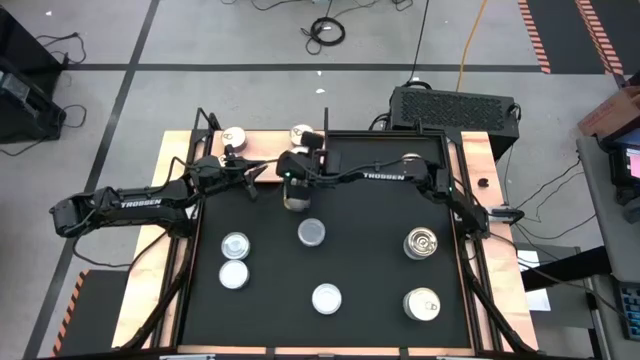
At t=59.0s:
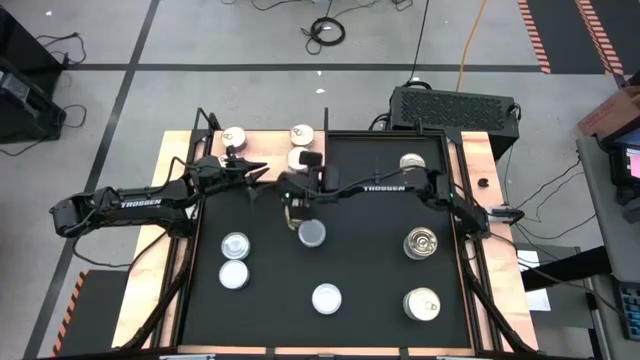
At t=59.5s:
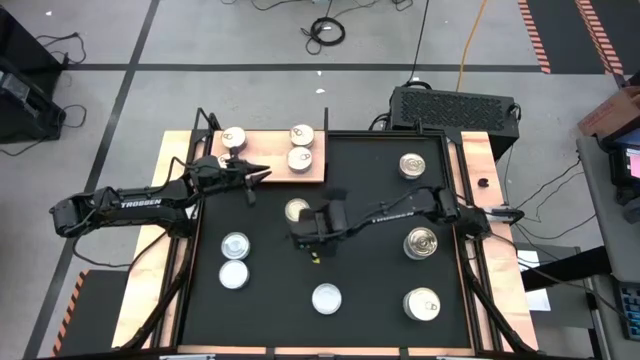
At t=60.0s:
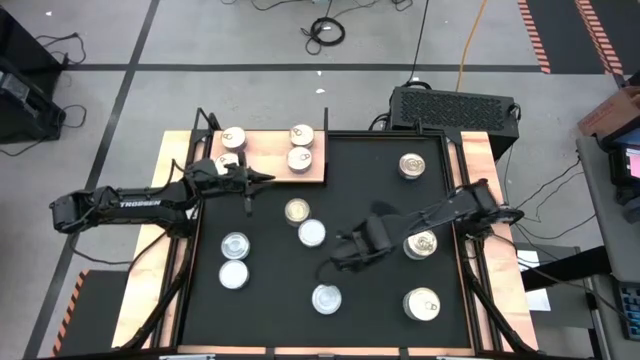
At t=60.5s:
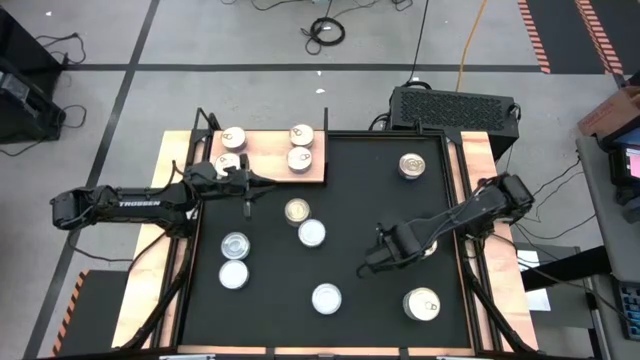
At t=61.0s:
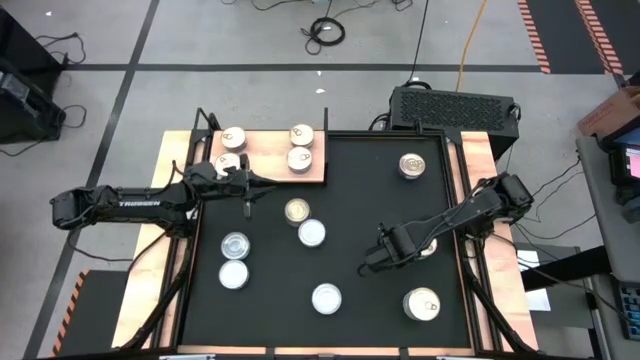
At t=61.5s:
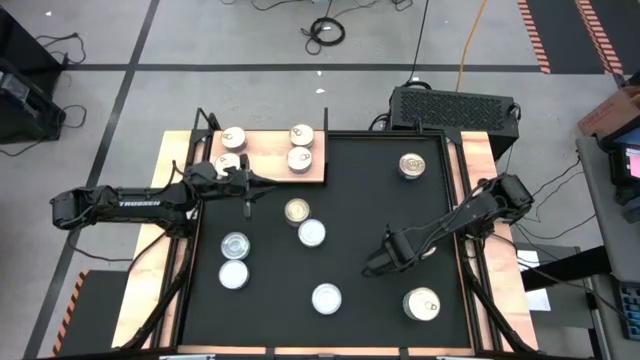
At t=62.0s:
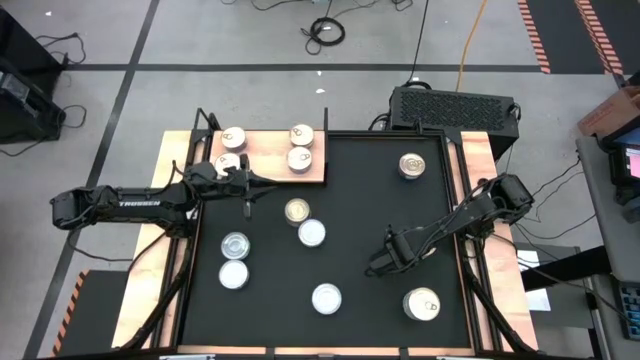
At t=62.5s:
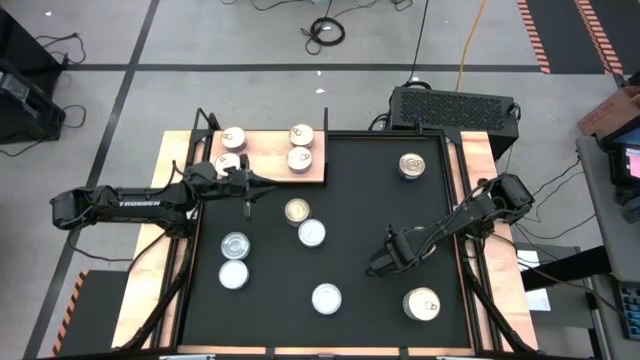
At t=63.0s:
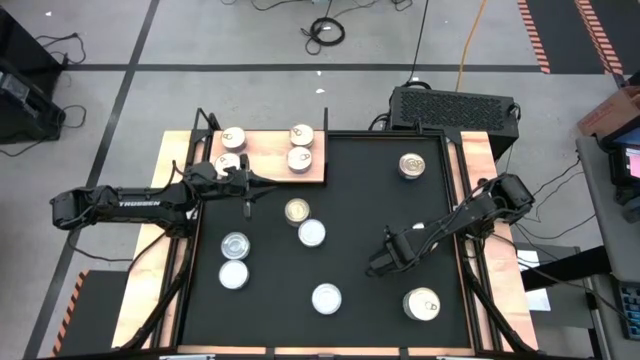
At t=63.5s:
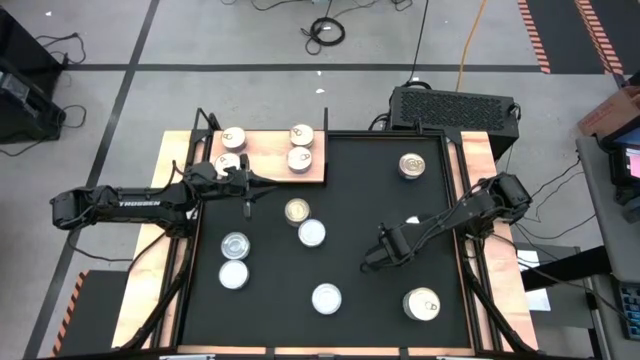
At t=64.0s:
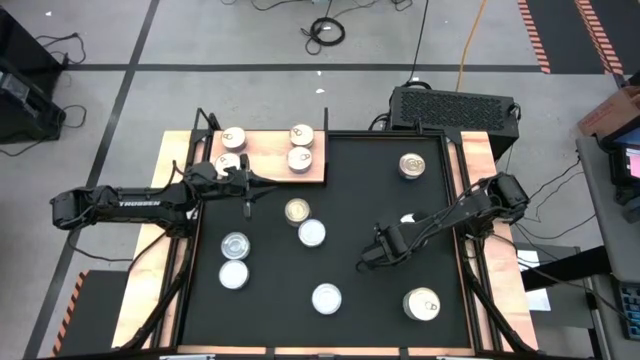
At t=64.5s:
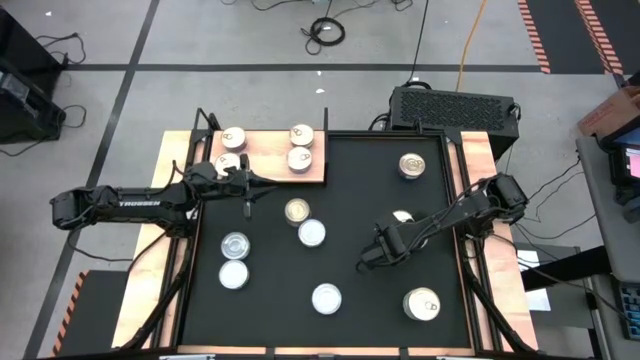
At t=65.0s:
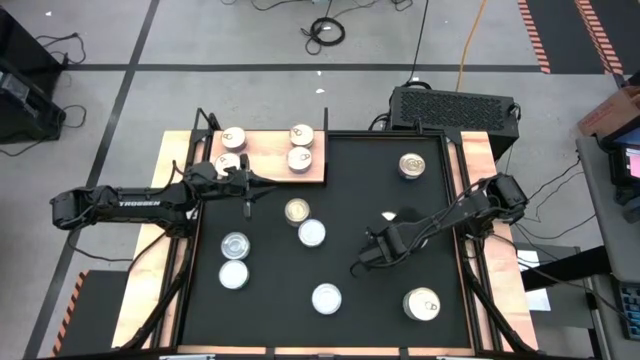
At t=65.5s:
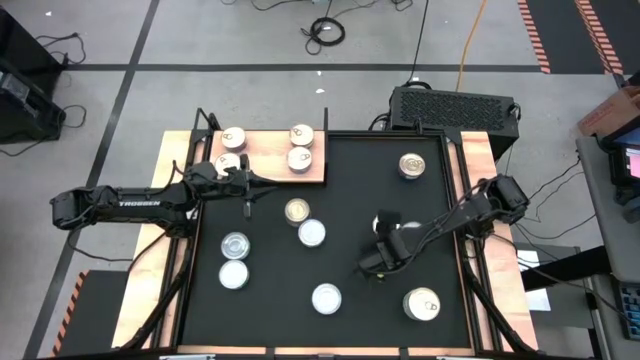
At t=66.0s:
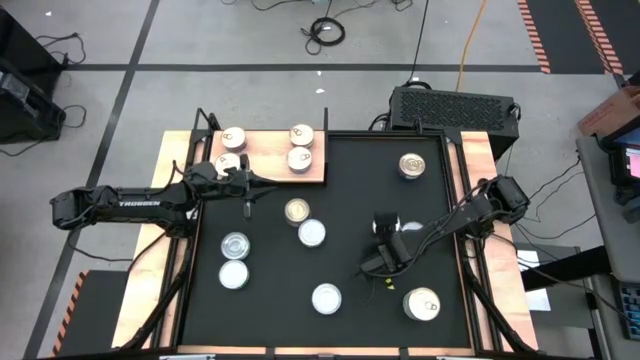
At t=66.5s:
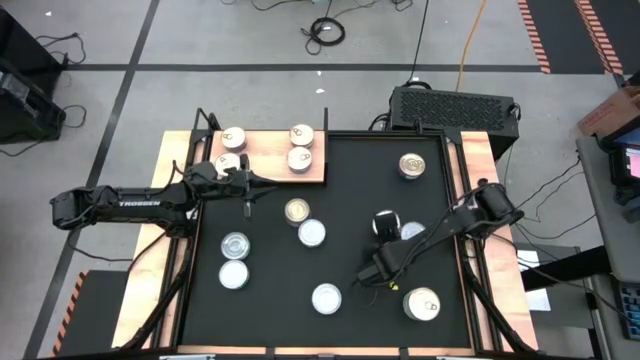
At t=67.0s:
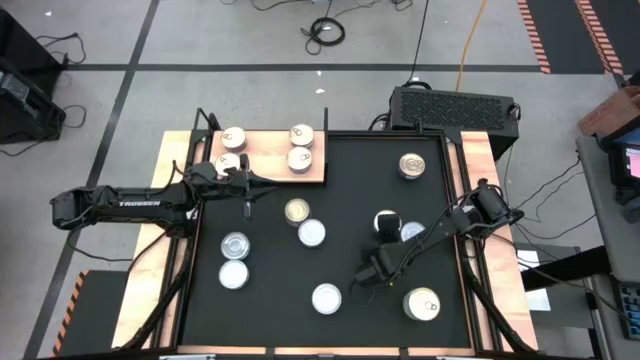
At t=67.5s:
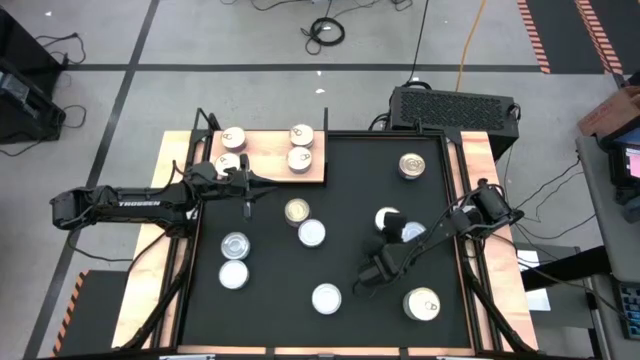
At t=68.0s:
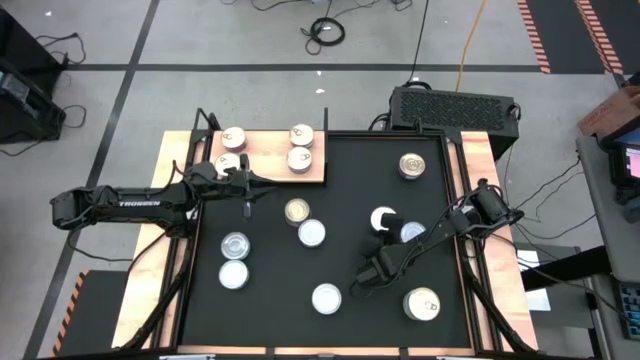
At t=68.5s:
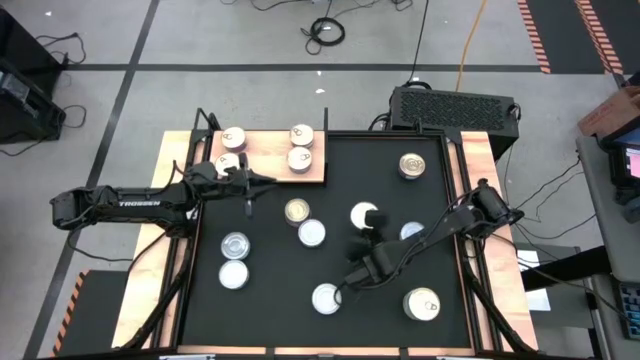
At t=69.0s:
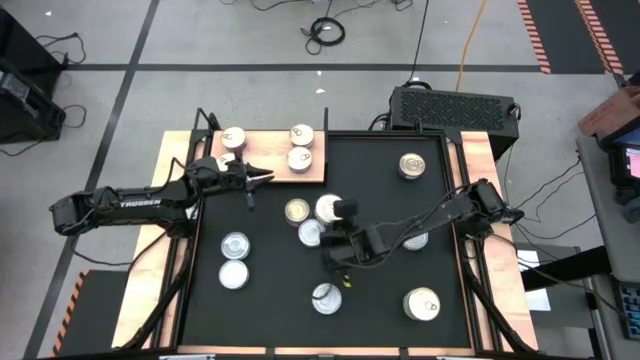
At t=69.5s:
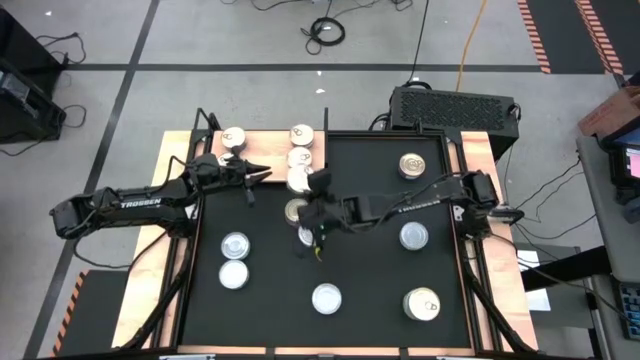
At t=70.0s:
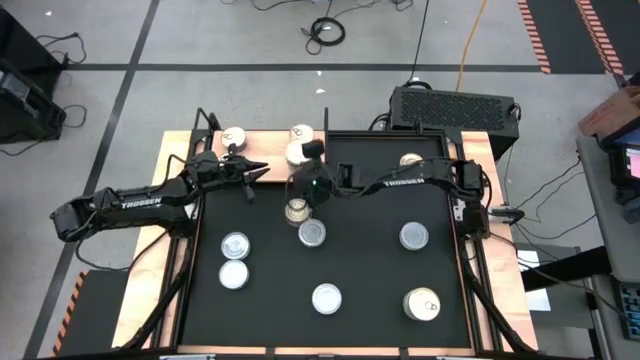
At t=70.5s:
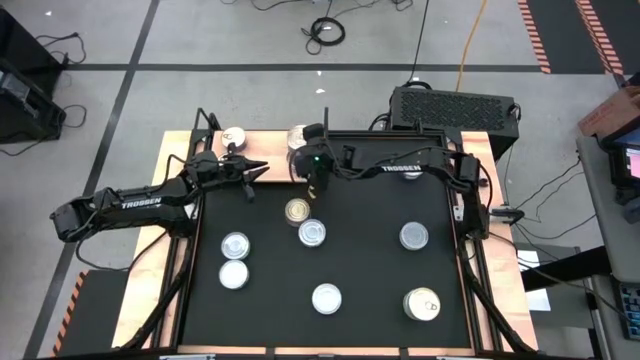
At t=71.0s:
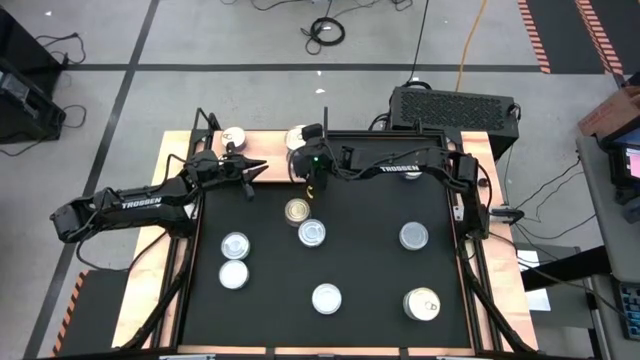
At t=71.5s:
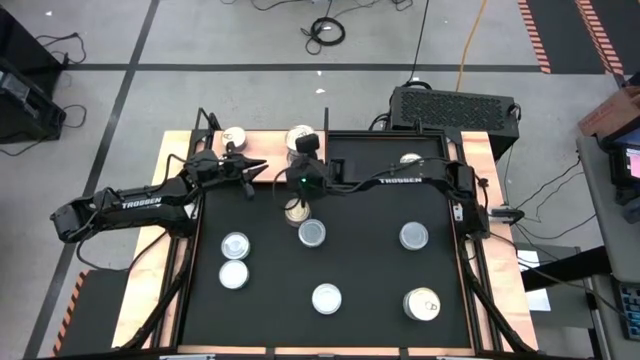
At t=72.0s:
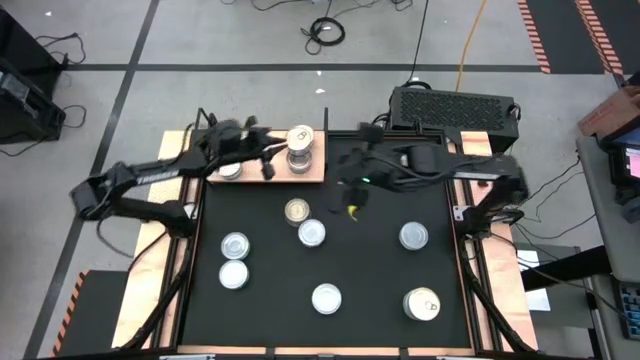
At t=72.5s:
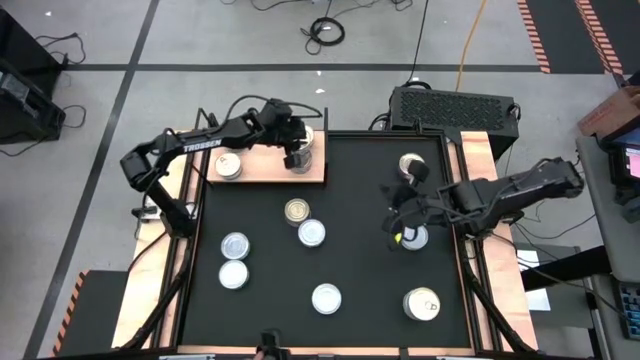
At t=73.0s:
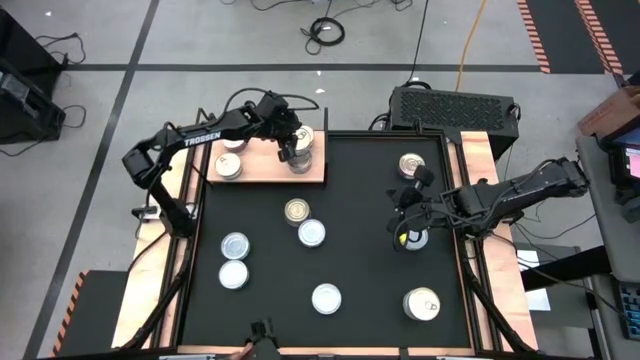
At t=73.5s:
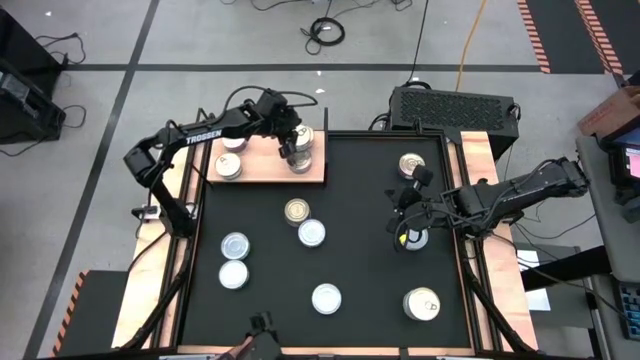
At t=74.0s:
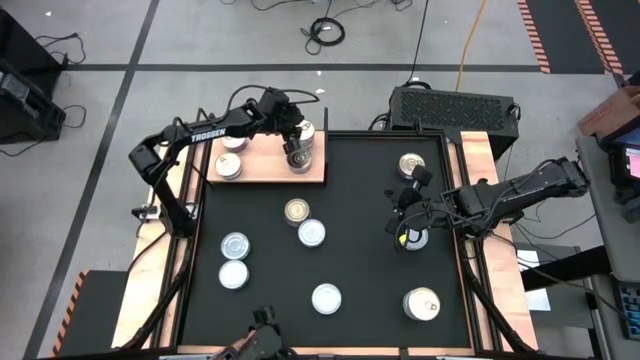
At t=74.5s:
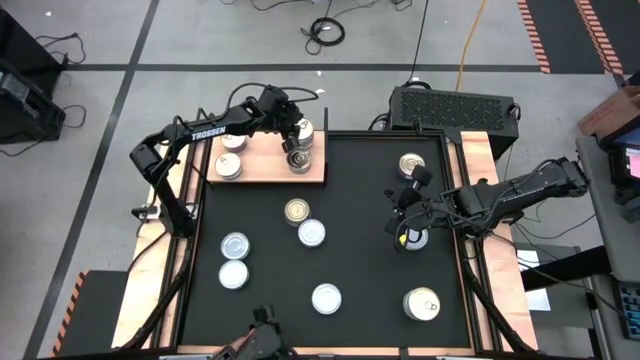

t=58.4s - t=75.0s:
Task: Stack canned seafood by type on shelf
Stack the blue-pink tuna can on top of the other blue-pink tuna can on the shelf

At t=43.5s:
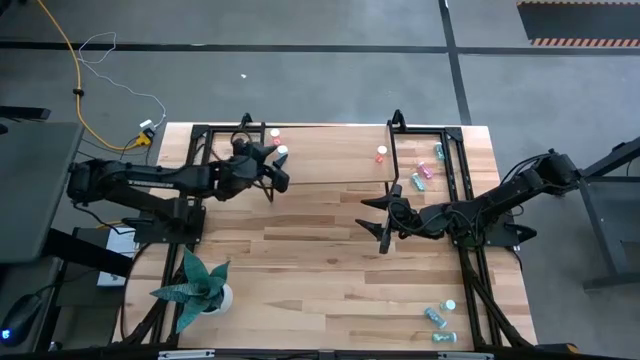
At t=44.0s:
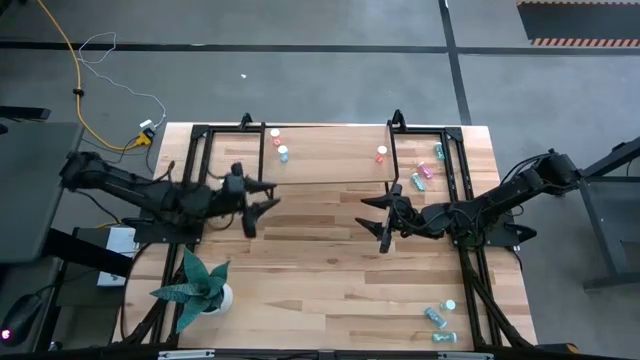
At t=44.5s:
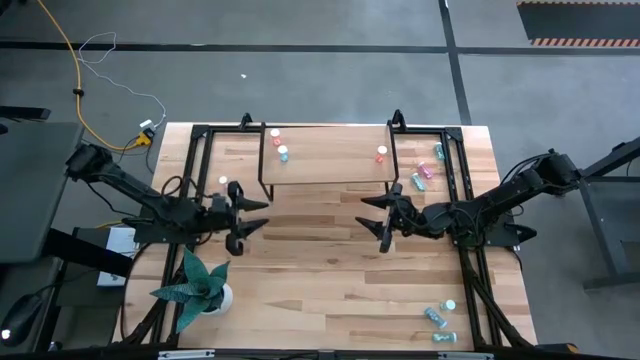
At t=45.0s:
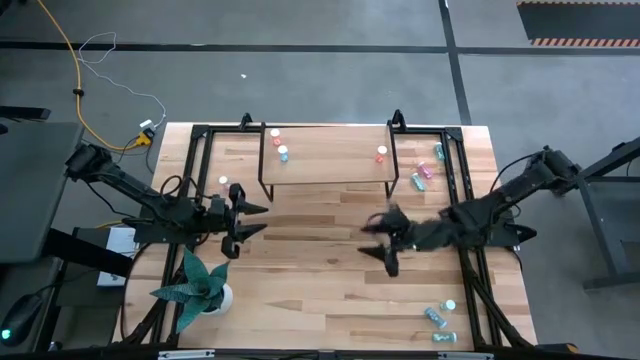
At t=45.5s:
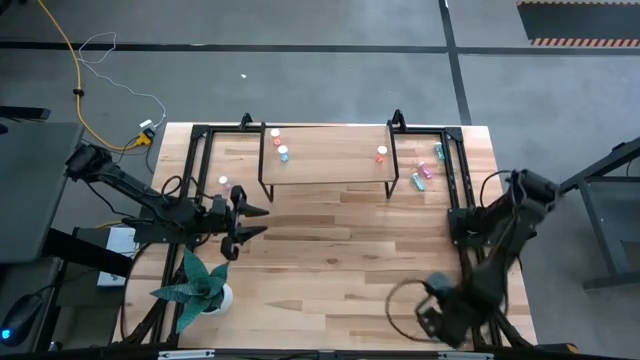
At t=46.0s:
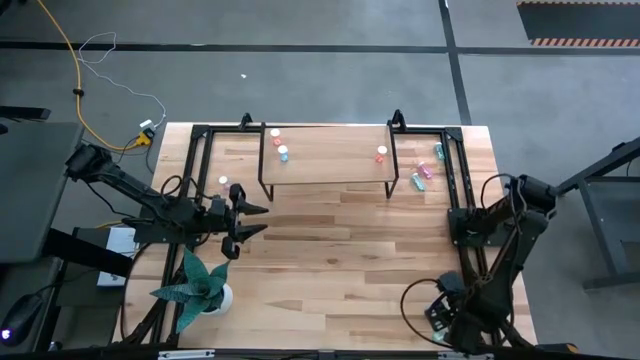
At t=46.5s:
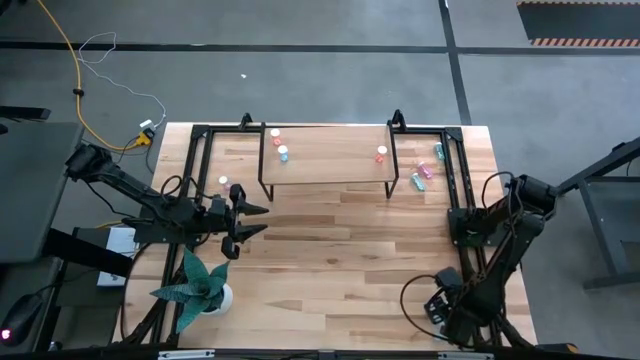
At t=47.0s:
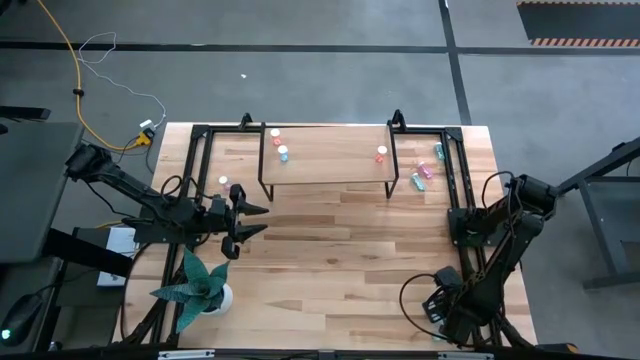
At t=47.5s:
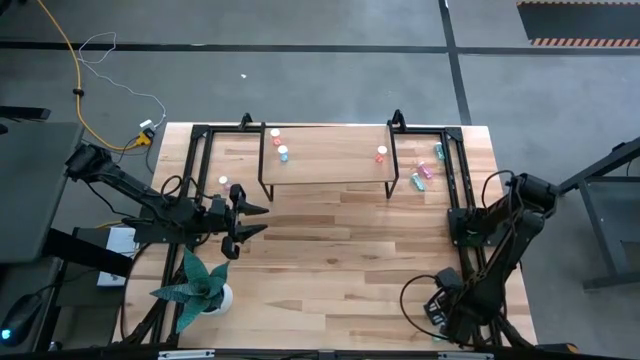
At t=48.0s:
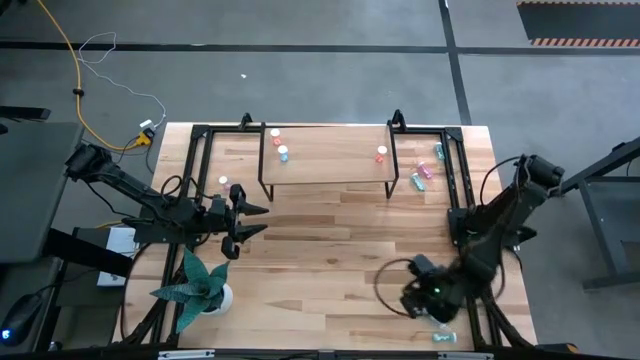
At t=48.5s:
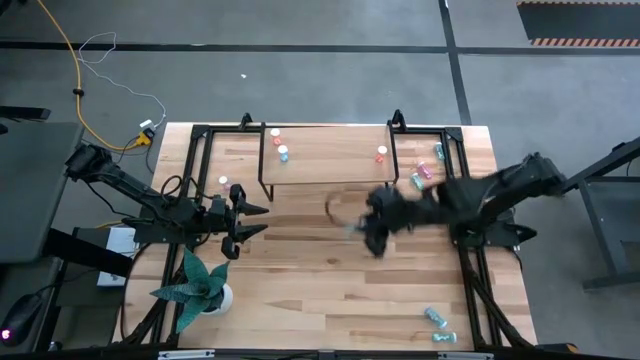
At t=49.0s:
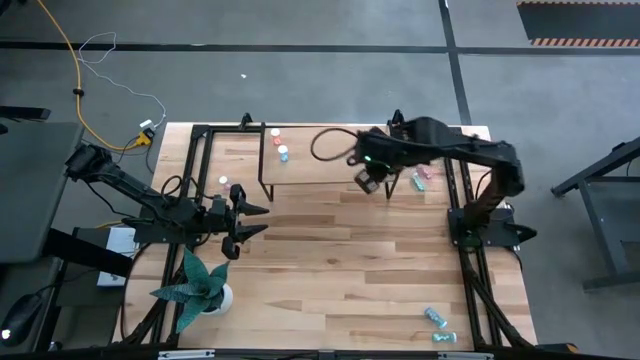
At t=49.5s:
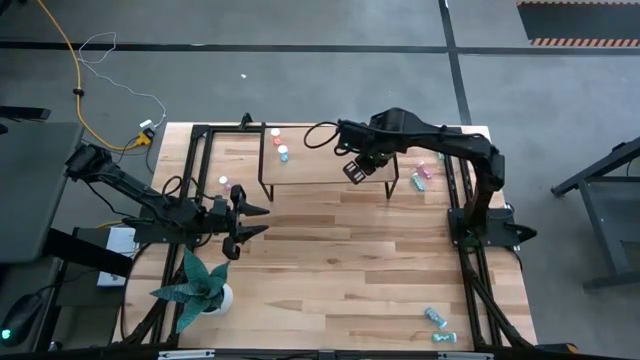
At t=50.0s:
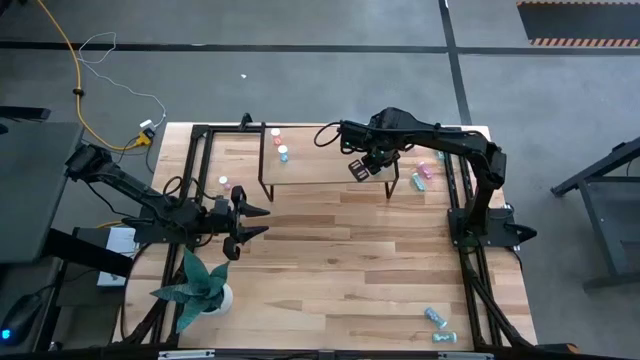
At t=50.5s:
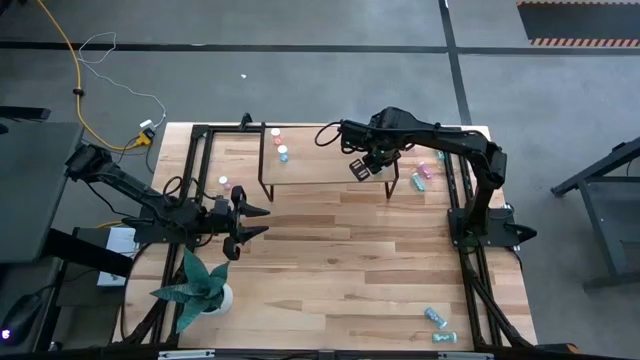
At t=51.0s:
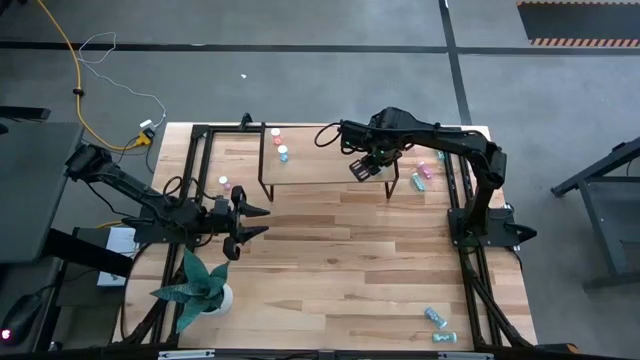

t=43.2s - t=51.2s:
Task: Pick and place medicine bottles onto shelf by color
Put the green pill bottle on the shelf
